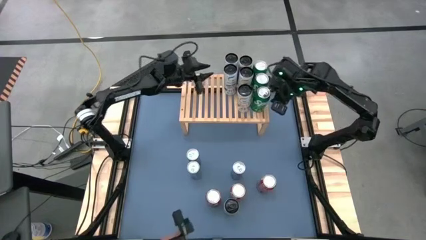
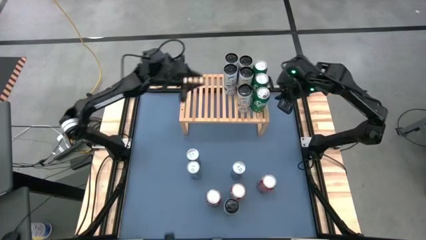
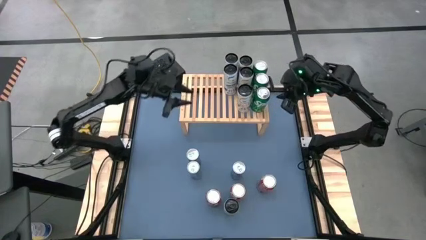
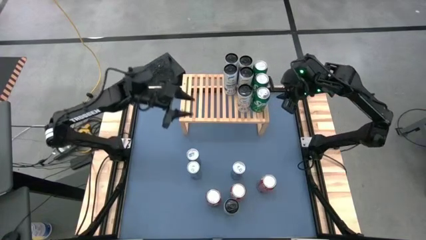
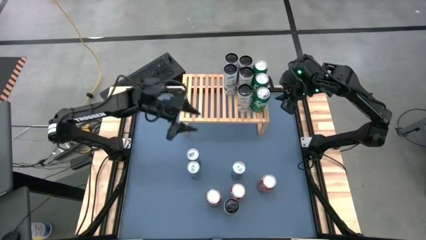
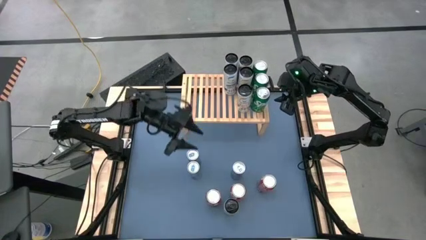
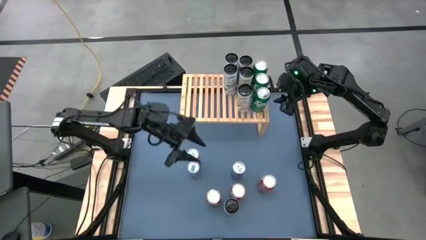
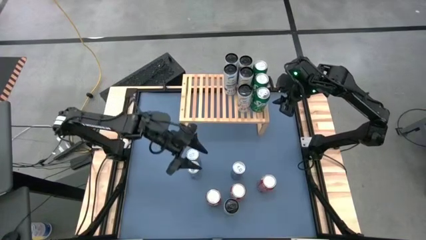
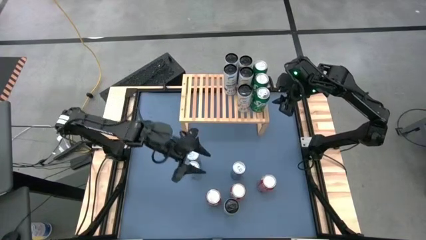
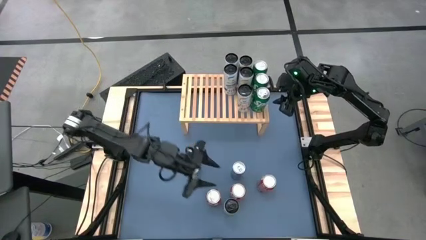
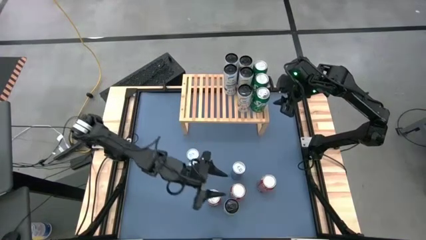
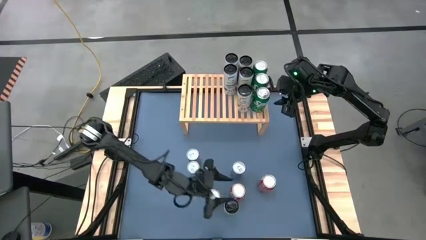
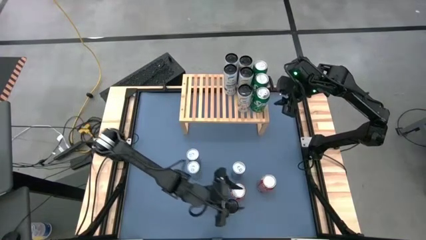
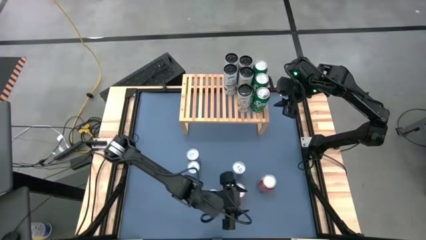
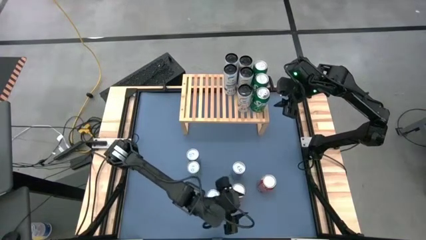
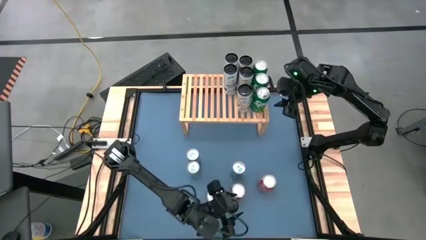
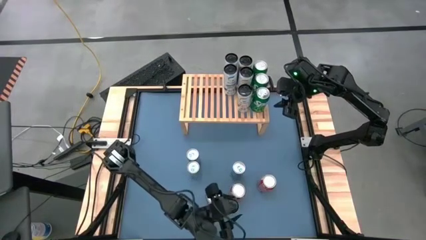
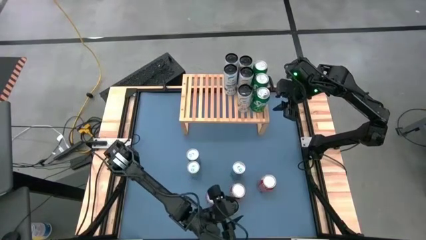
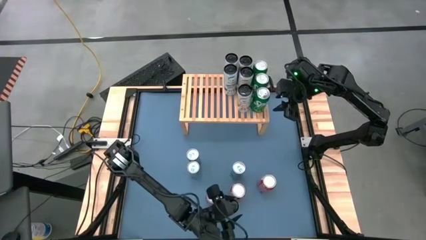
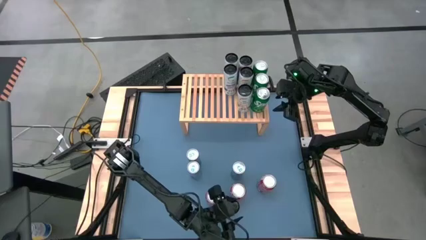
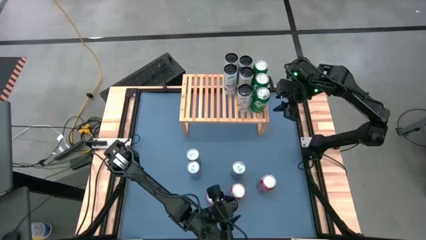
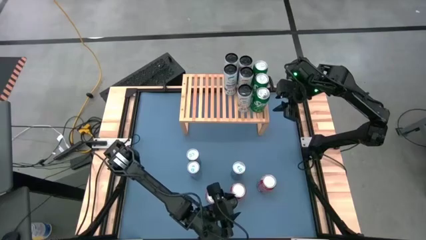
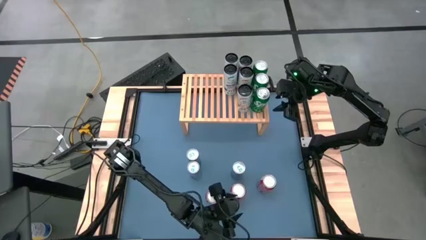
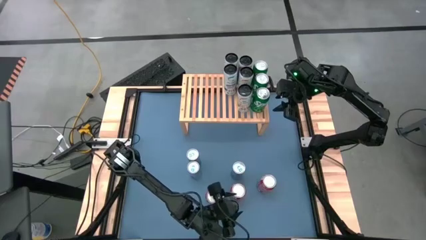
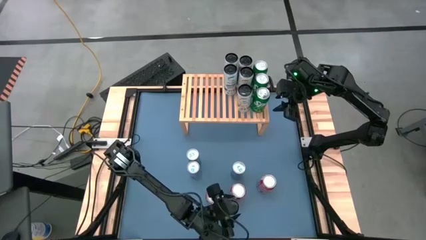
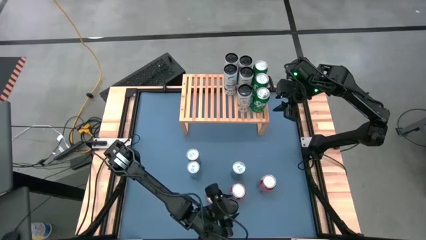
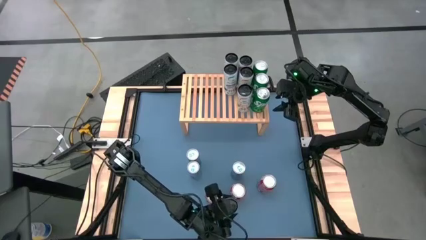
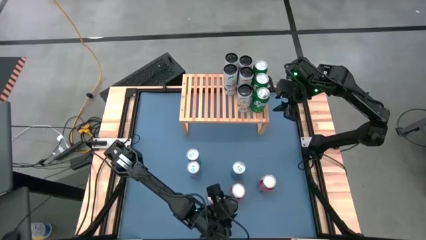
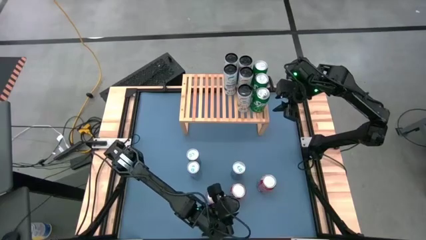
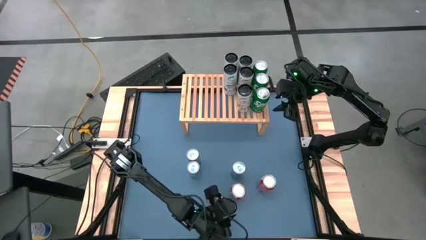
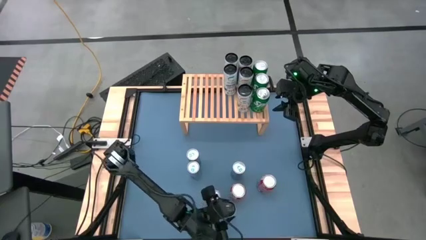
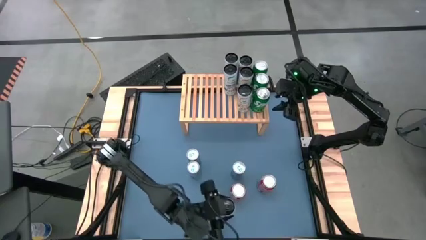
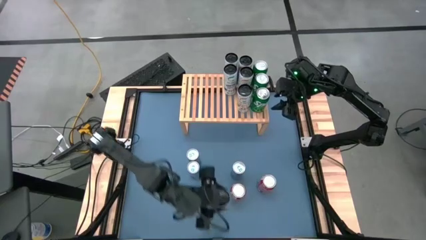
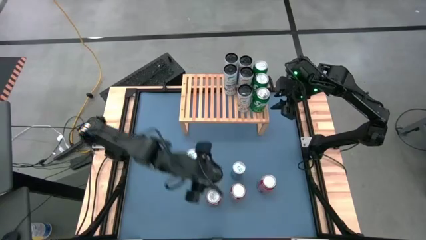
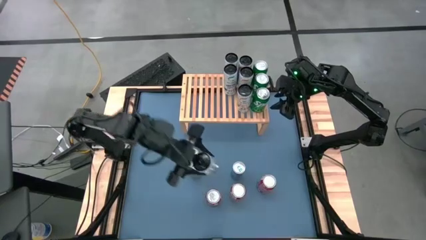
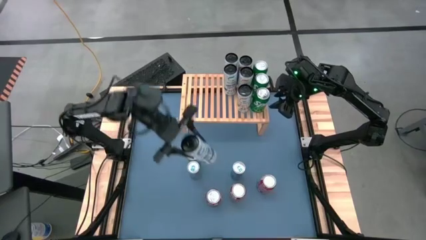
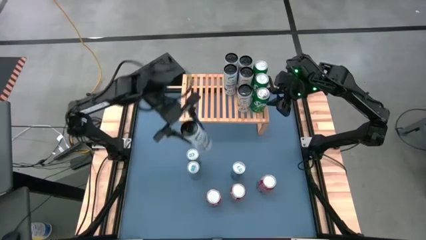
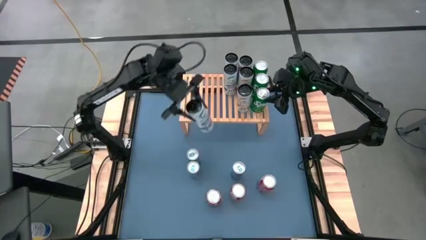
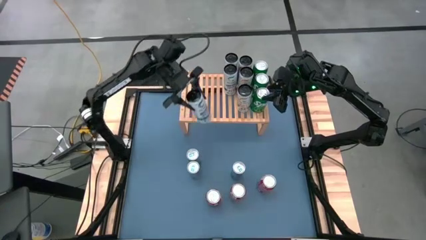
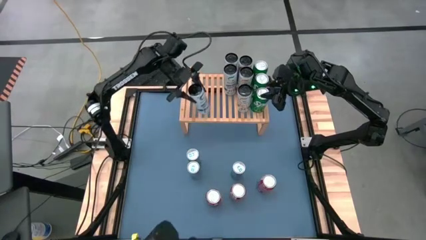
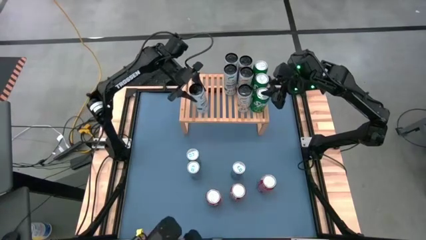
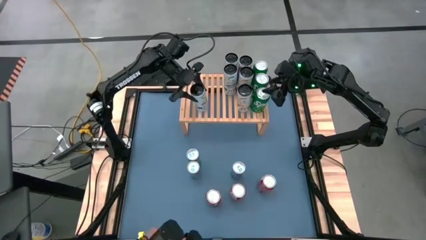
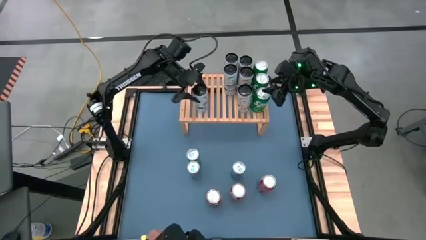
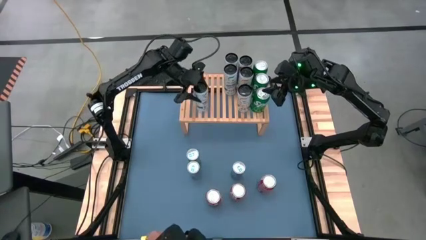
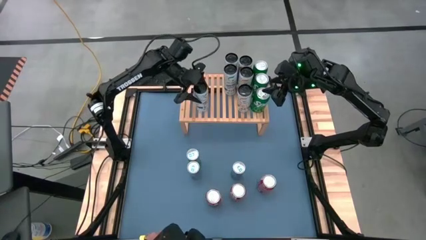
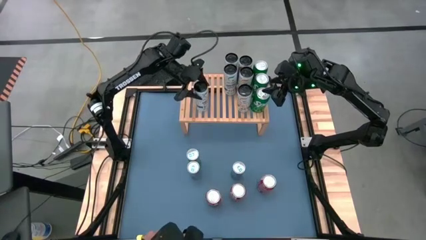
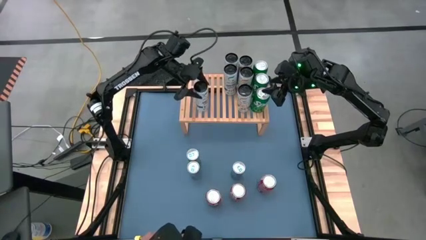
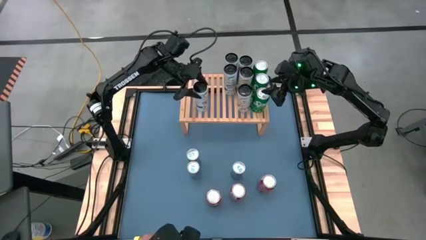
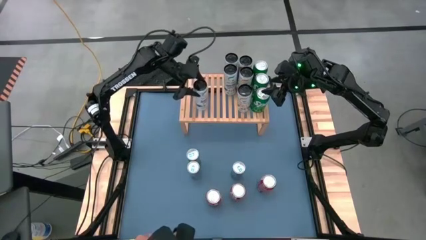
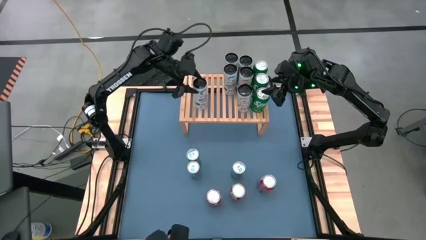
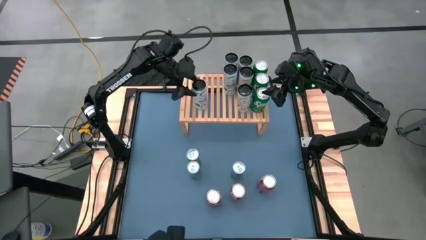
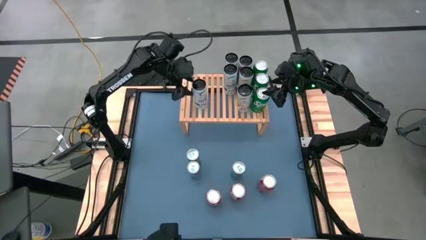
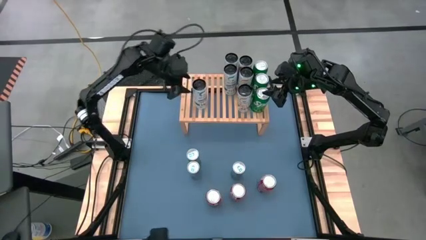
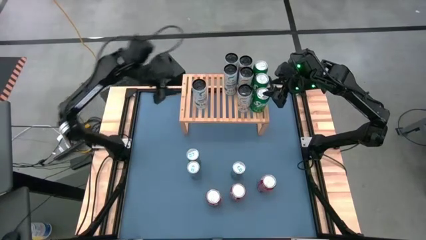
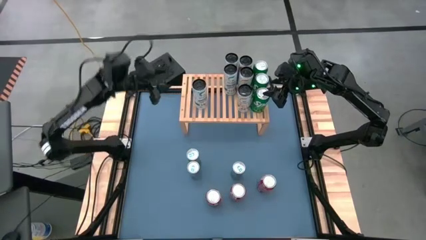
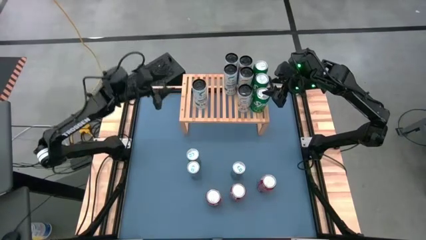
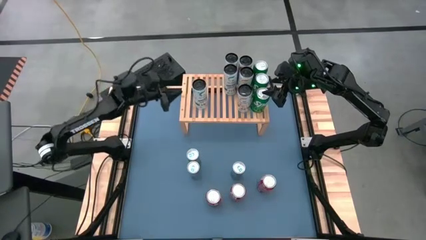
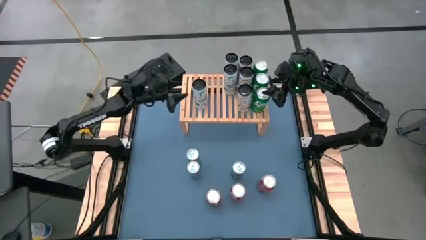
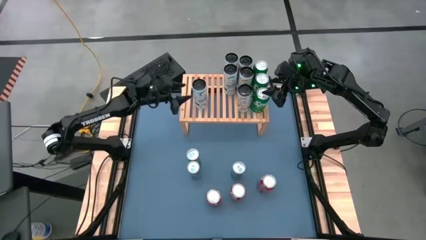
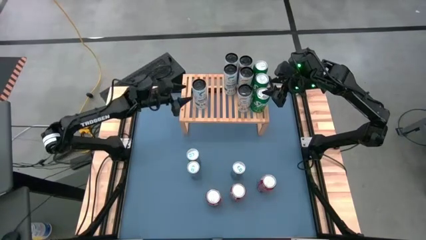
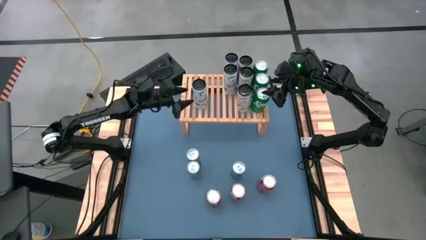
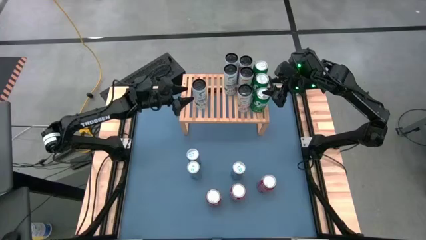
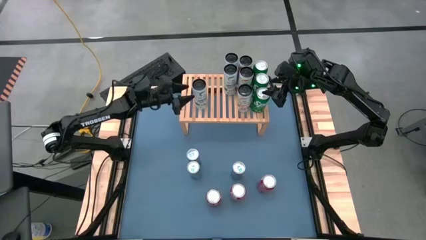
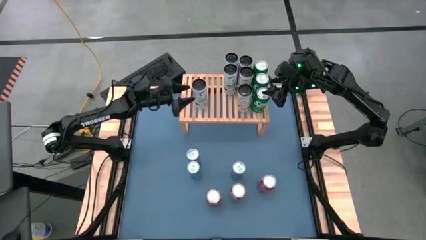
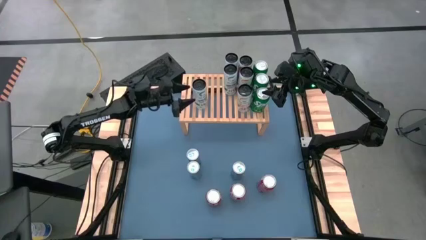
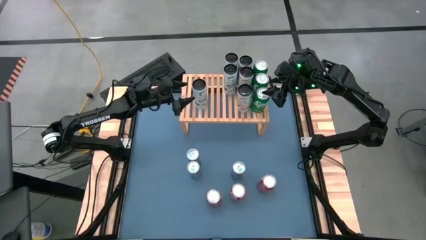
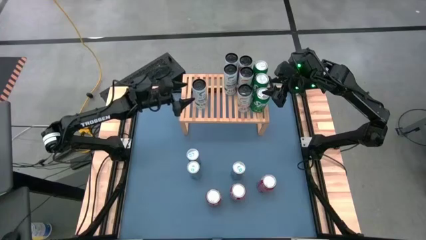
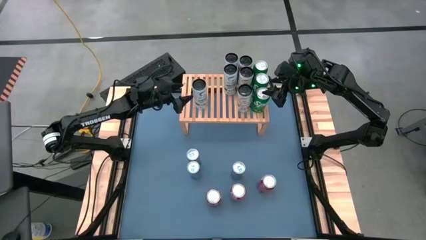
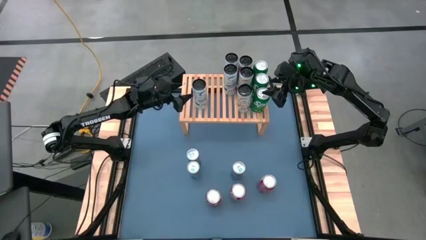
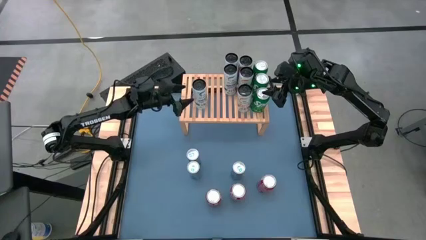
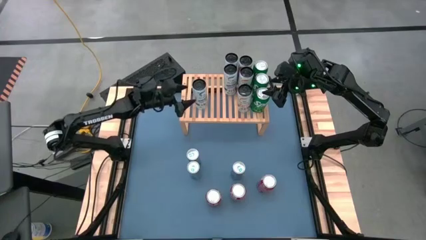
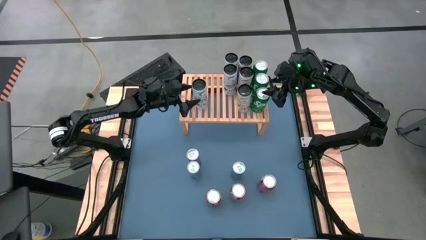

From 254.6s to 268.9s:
Task: Place canned beverage on shelf
Put the white-blue soda can on the shelf aligned with the other white-blue soda can
